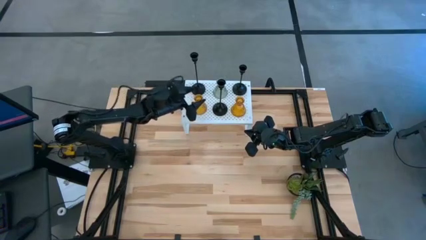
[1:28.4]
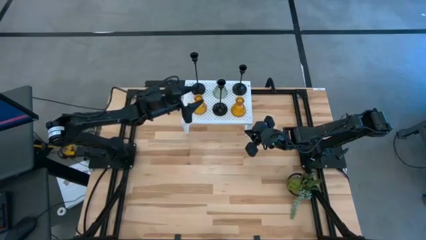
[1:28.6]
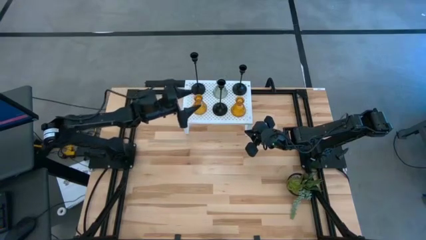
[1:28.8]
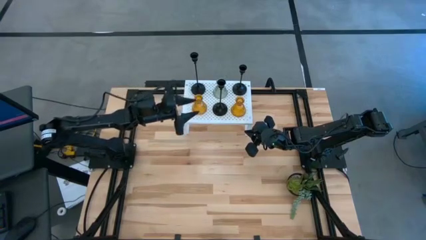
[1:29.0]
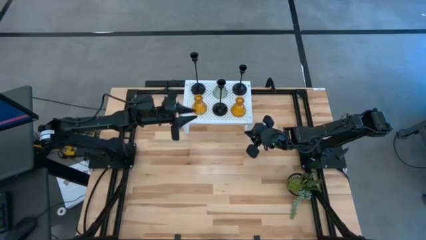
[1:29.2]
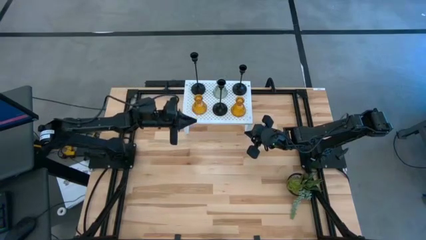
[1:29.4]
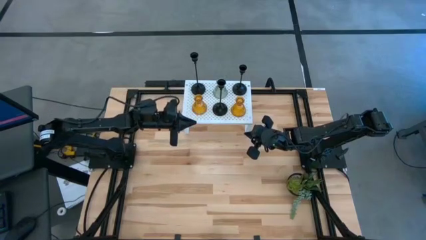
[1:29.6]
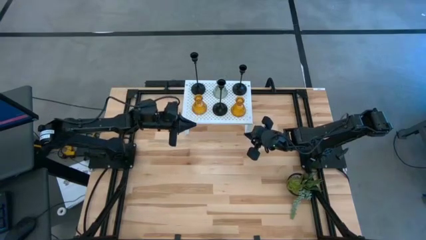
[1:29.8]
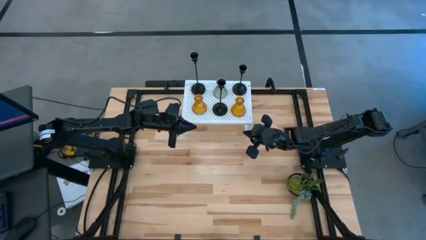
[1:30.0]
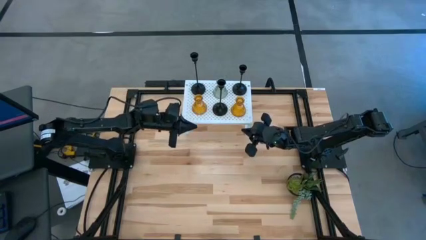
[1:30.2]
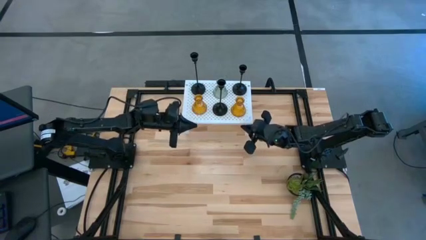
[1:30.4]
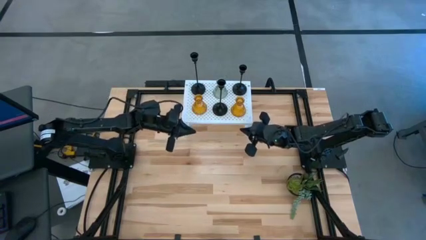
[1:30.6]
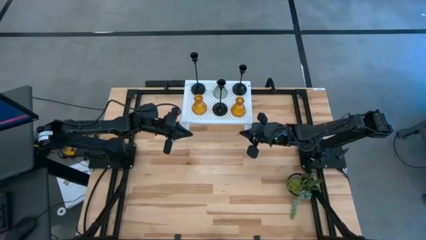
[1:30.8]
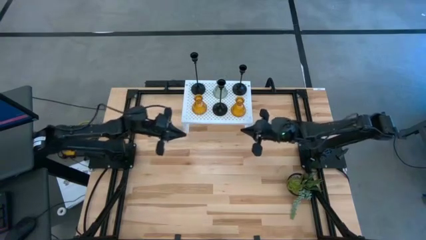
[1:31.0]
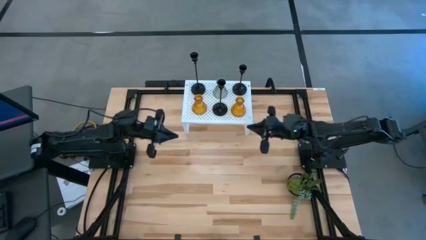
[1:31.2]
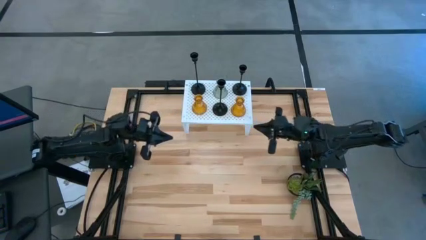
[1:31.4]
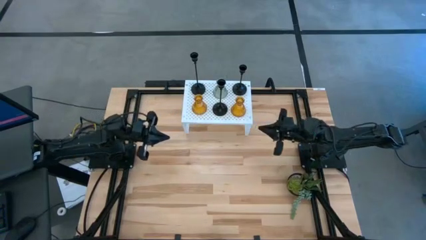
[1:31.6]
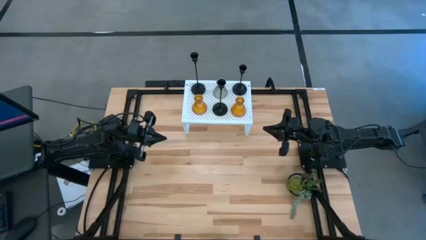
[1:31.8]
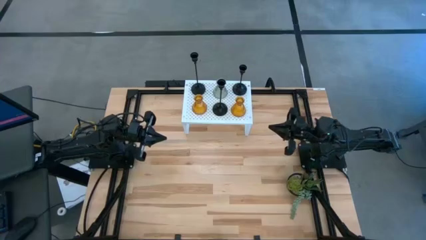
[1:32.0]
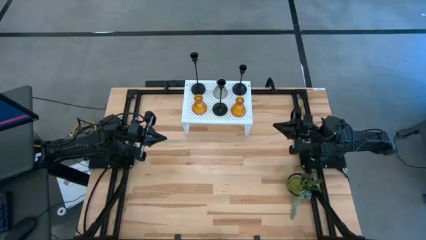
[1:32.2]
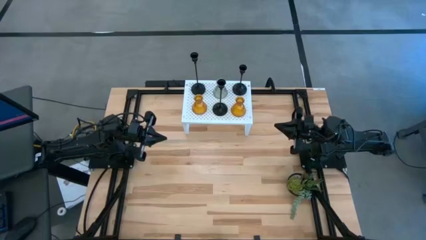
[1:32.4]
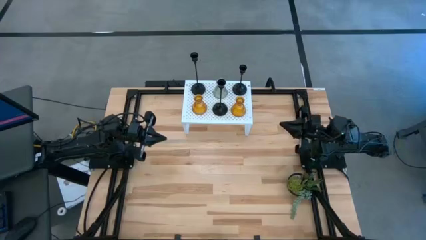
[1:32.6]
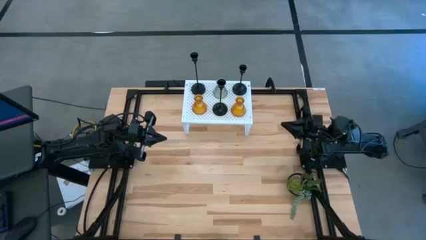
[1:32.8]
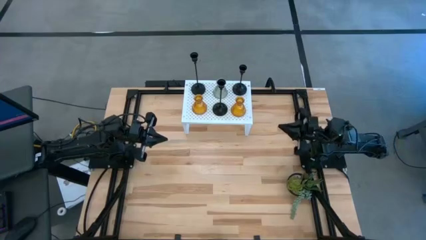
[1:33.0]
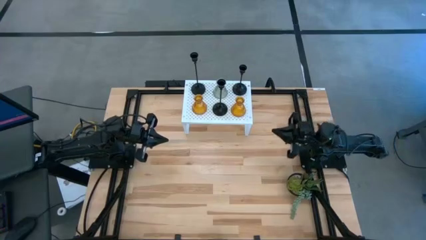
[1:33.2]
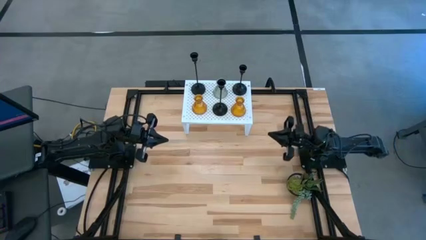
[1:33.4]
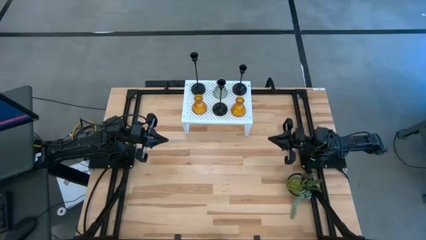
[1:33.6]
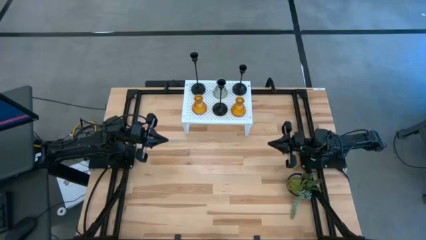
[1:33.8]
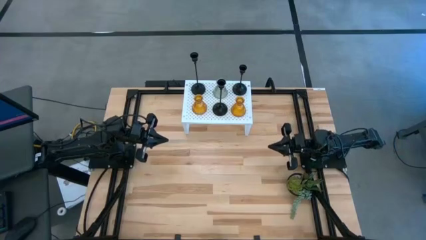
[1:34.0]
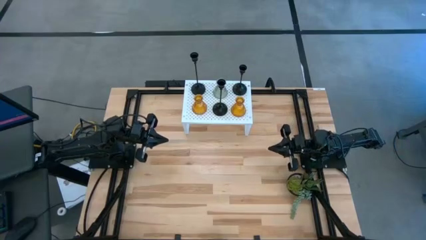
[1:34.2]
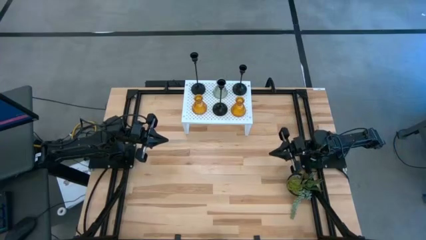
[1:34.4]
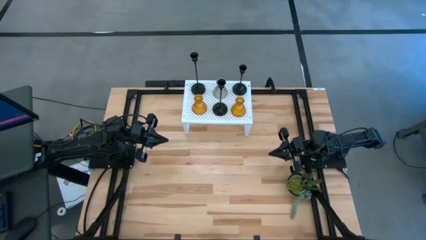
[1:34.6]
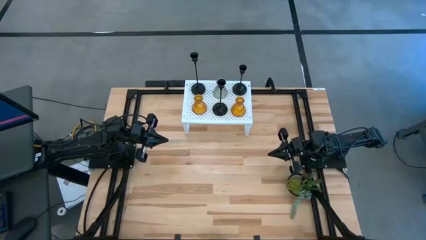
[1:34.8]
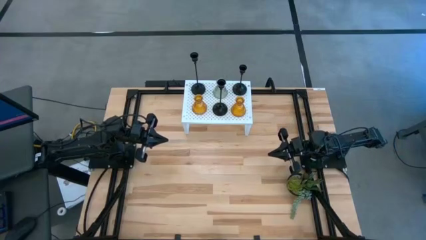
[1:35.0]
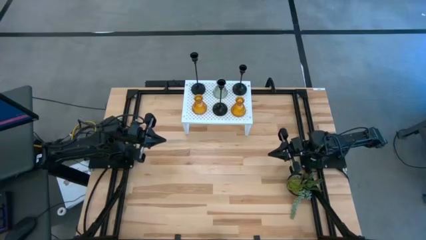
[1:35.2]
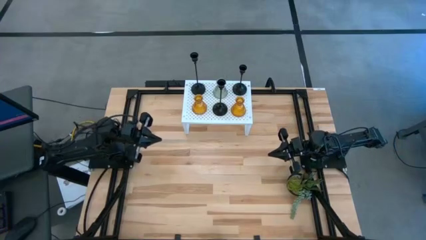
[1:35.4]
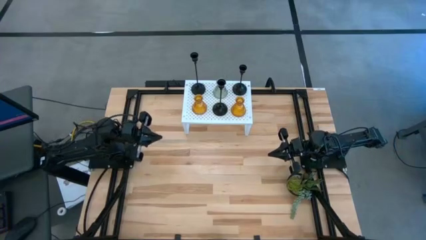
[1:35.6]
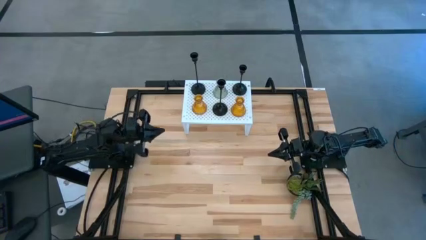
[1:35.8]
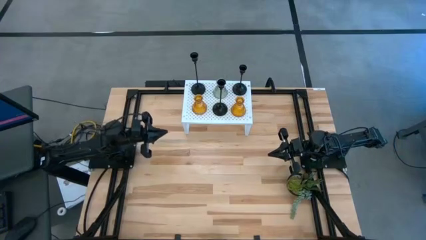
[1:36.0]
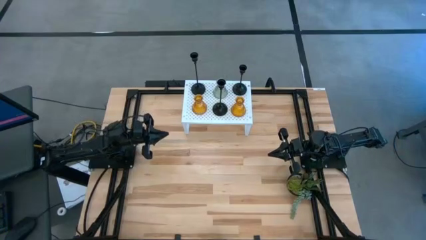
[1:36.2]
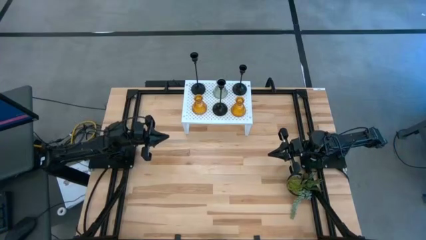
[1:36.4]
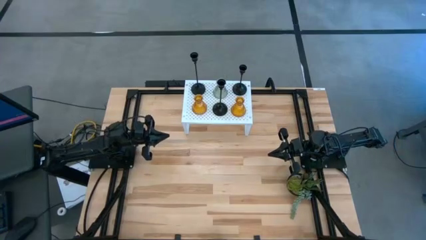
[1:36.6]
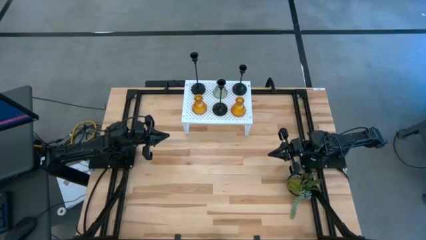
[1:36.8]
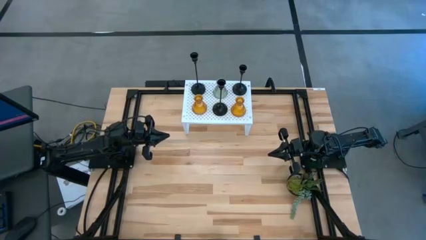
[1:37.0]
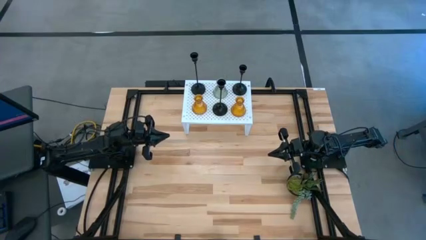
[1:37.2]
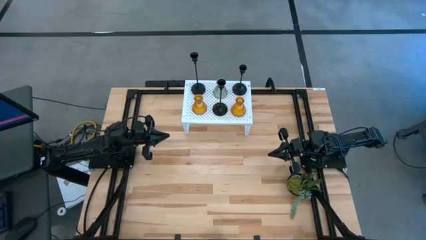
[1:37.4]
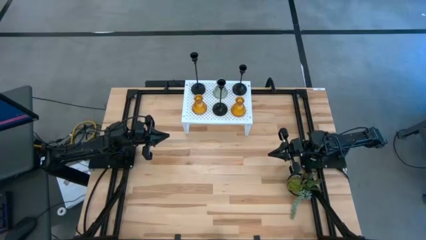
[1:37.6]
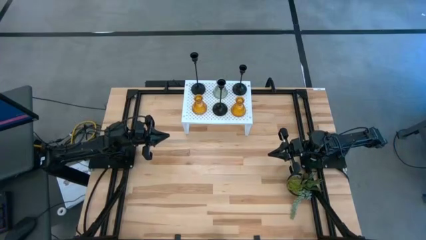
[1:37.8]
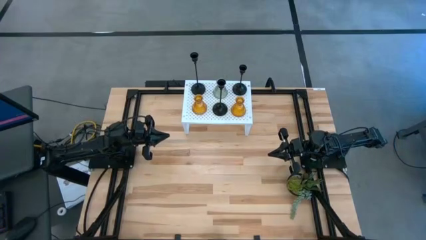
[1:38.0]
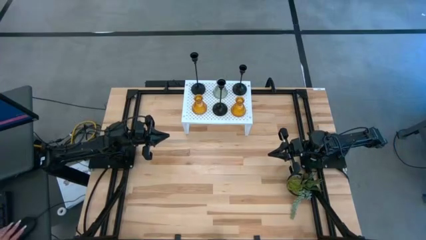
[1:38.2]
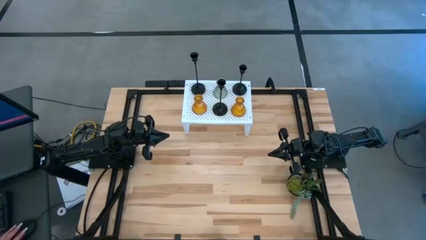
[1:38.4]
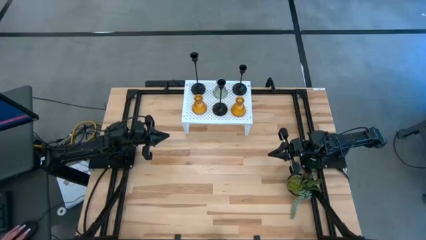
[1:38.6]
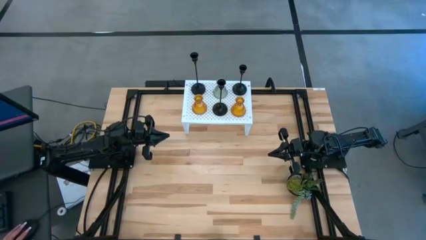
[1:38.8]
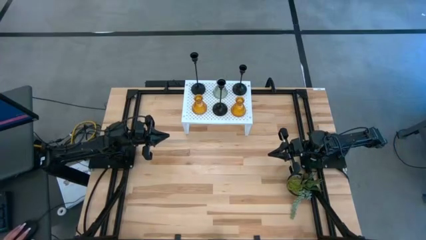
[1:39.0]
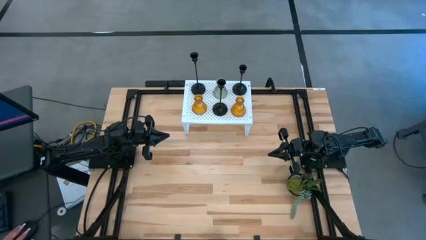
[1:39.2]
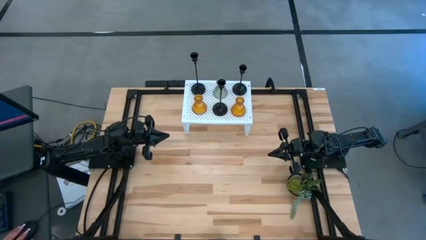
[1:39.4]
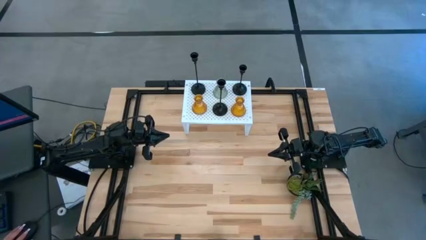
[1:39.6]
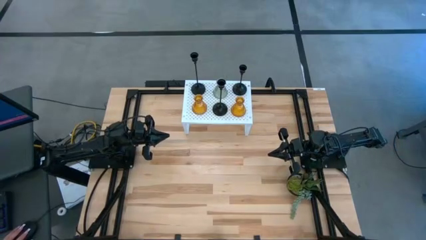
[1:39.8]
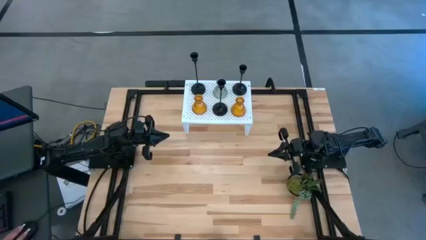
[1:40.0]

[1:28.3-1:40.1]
Task: Pick & Place candle stick holders
Return to Home Position

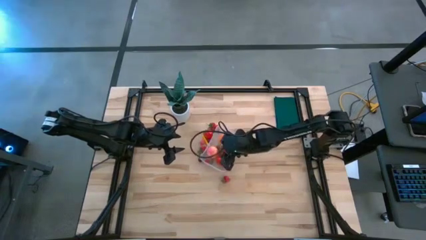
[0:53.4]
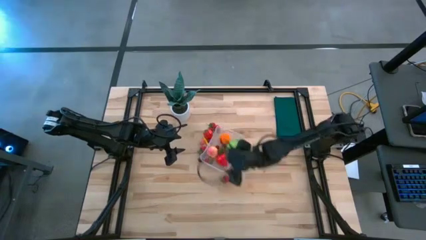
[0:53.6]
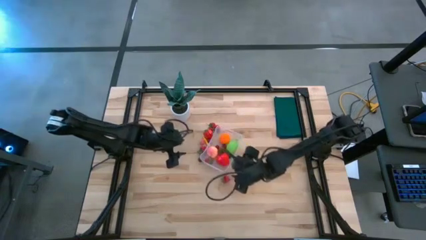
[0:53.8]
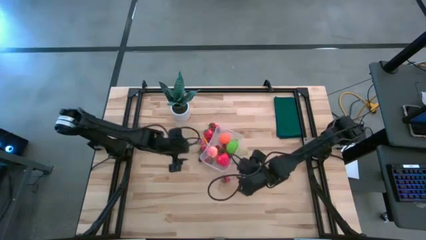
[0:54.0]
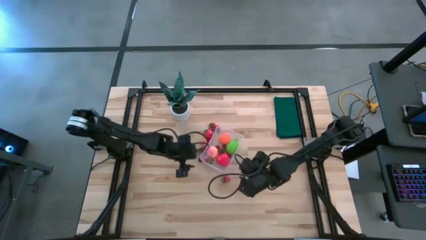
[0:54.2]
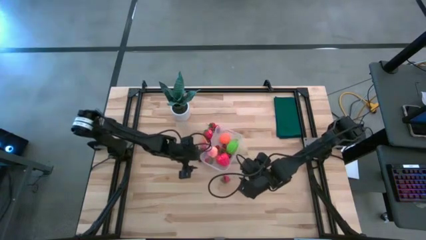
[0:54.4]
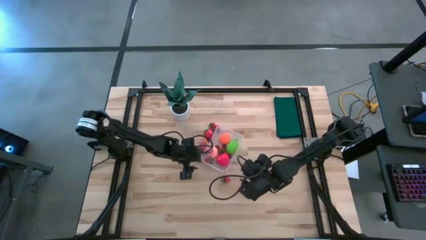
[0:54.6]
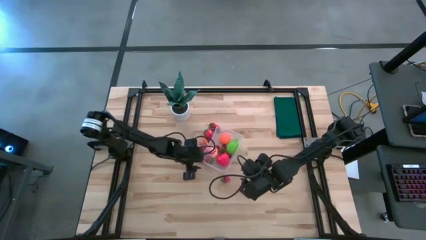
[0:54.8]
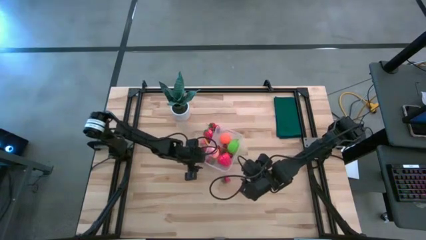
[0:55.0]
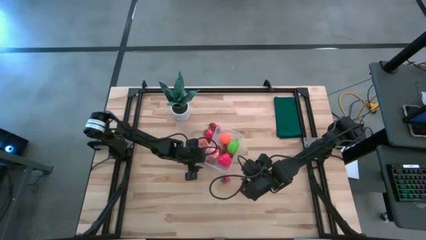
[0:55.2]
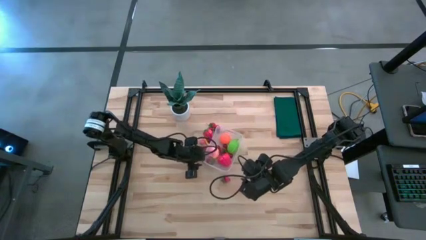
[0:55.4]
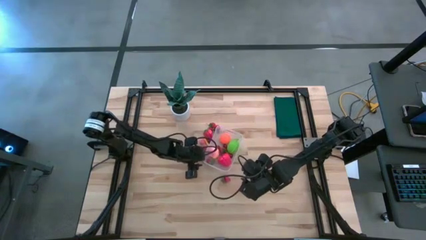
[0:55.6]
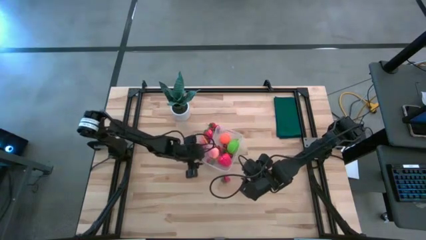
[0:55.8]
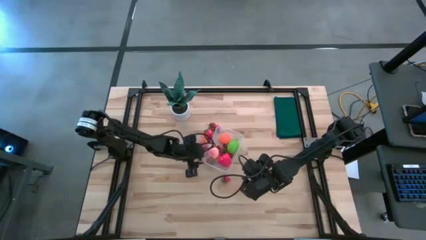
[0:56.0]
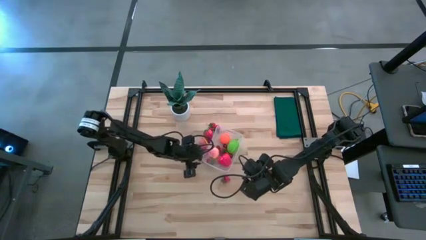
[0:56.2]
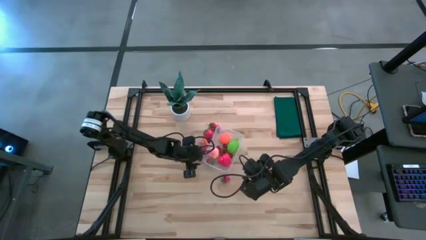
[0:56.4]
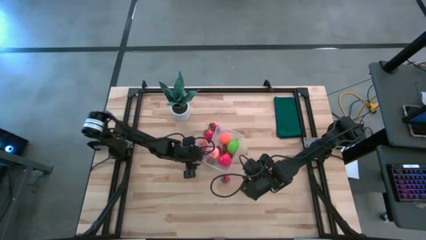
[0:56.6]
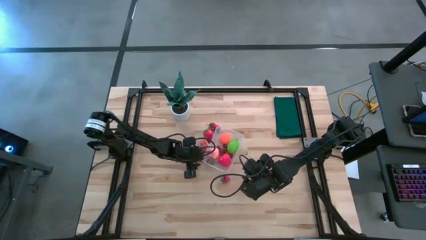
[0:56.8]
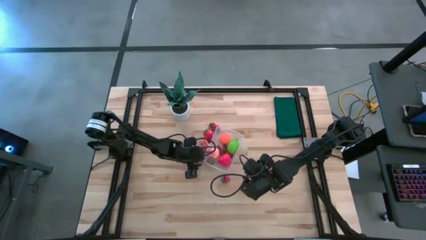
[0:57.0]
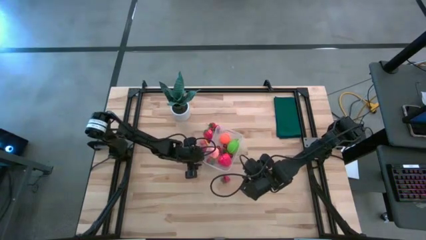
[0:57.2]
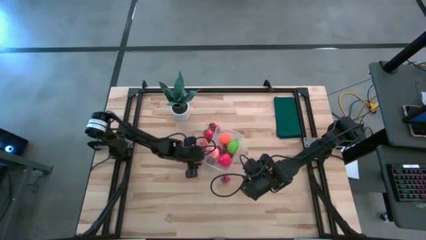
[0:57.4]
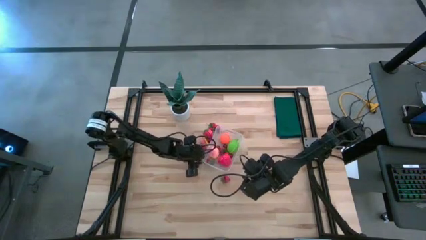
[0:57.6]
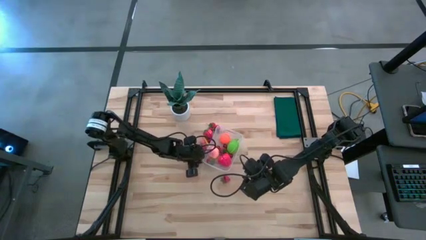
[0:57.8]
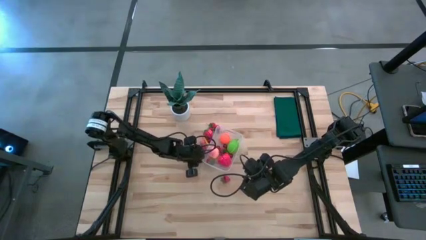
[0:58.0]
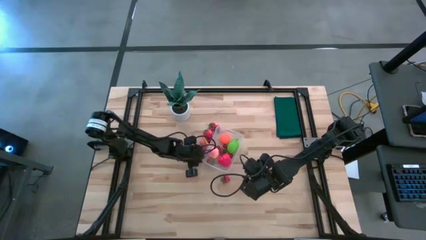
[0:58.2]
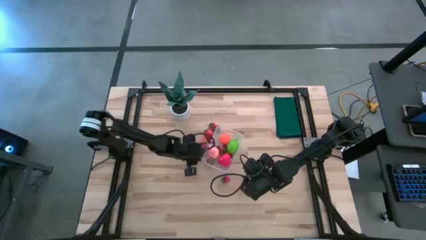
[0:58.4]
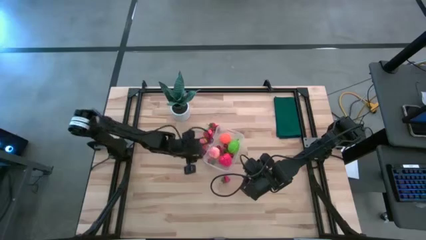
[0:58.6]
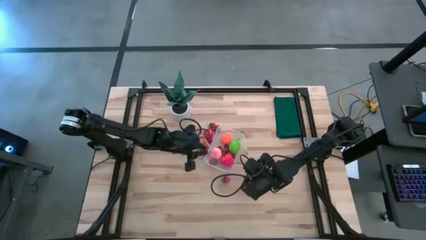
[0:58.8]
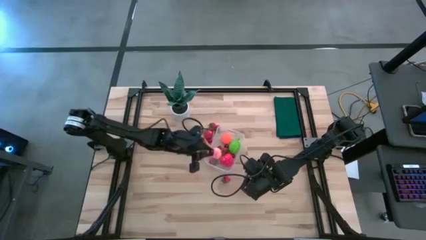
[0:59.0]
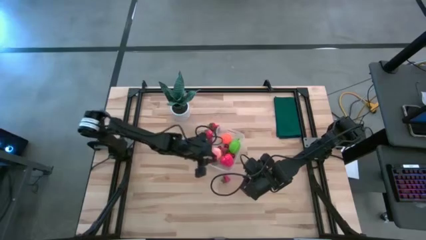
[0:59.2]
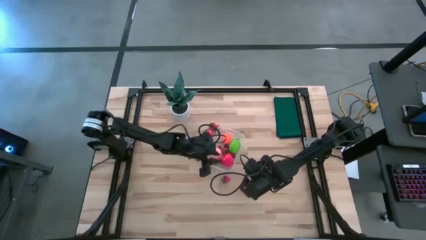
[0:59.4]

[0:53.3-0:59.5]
Task: Pick and placing Produce into tupperware
Put the red cherry into the container
